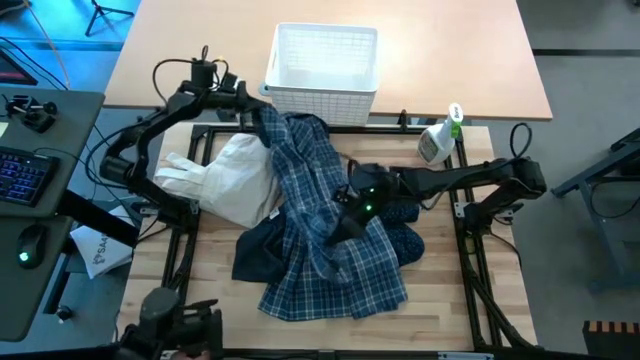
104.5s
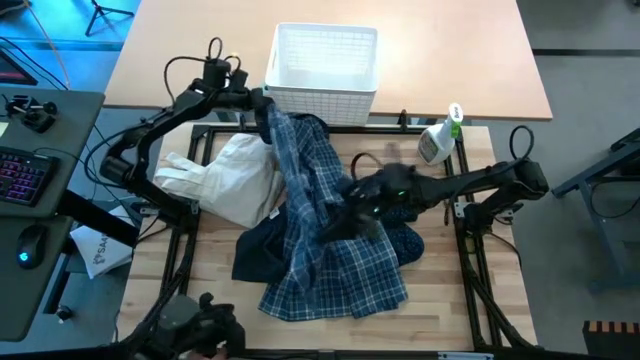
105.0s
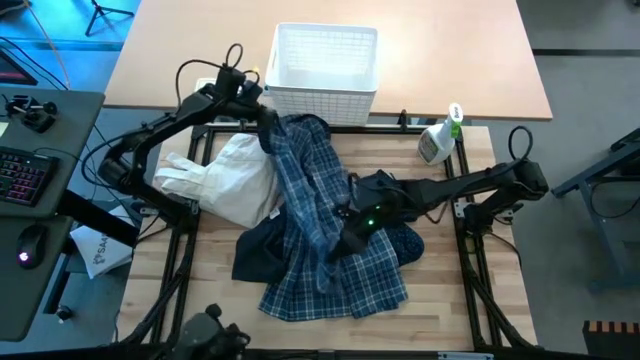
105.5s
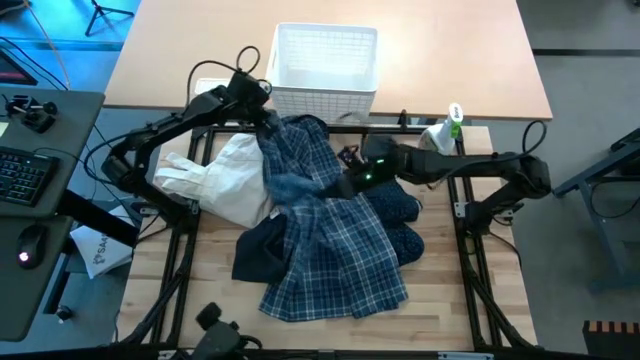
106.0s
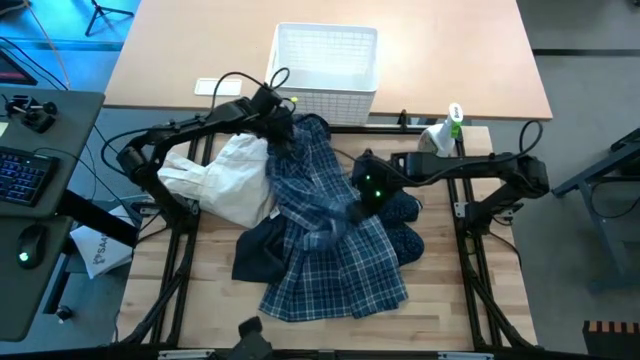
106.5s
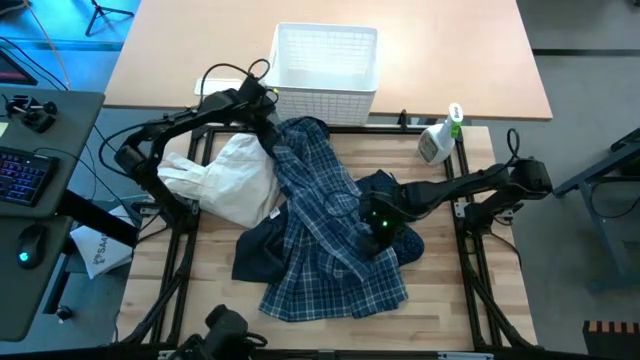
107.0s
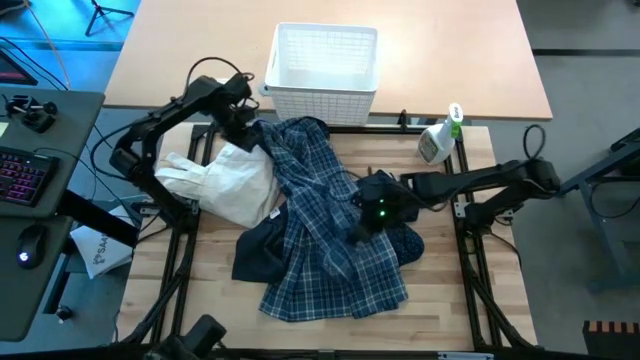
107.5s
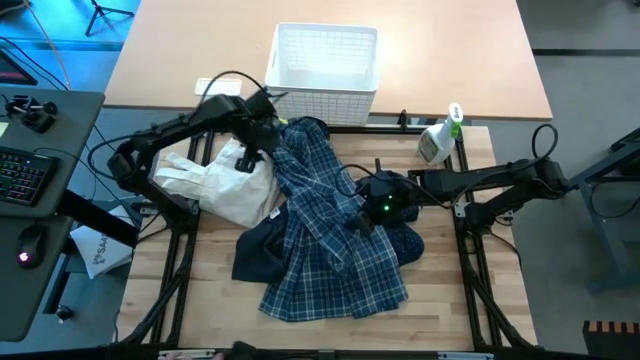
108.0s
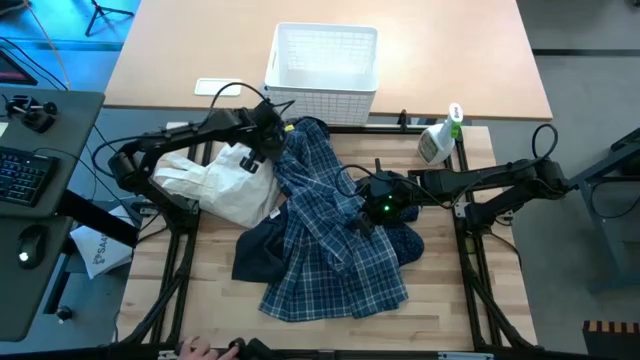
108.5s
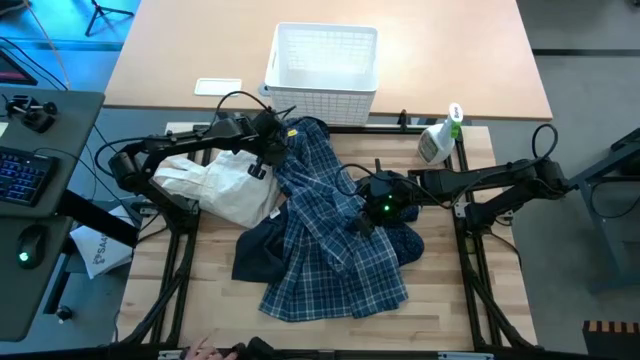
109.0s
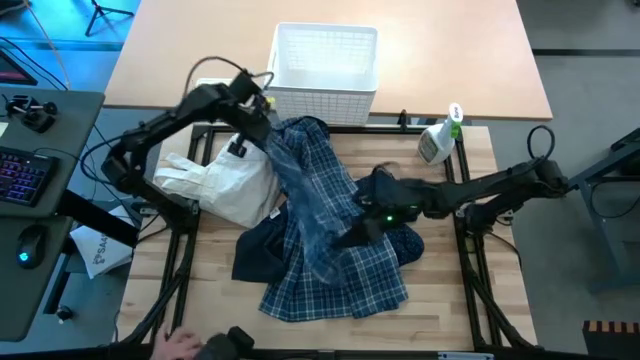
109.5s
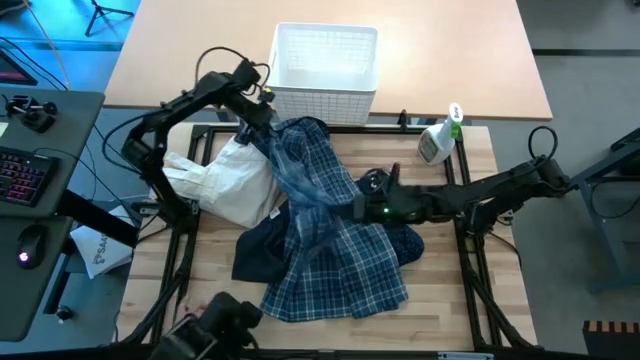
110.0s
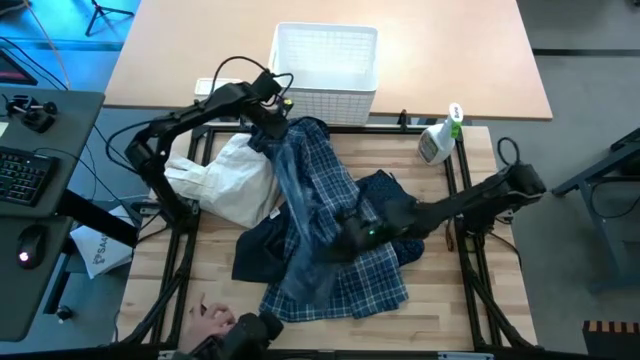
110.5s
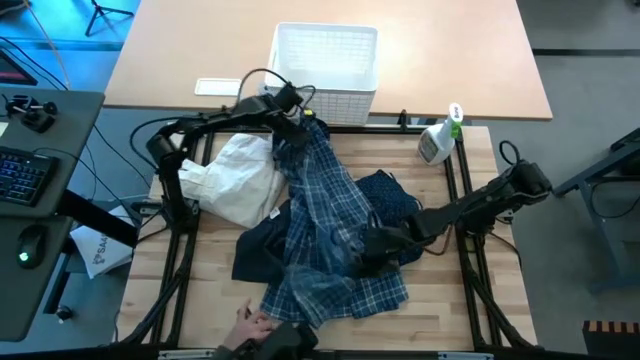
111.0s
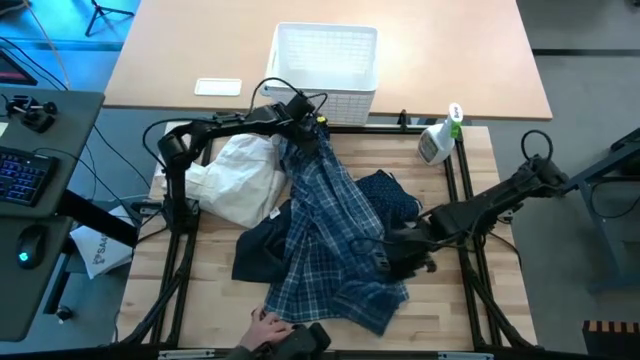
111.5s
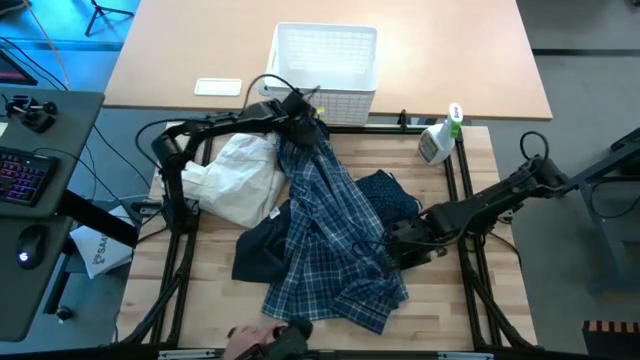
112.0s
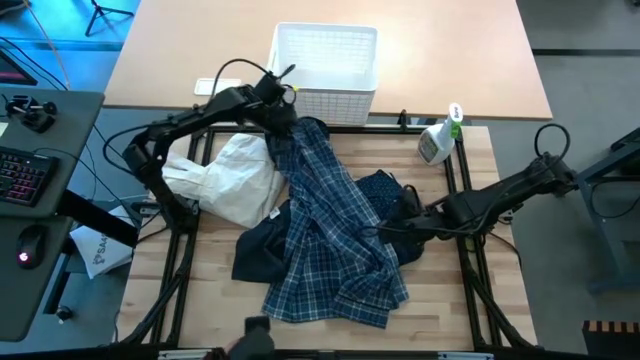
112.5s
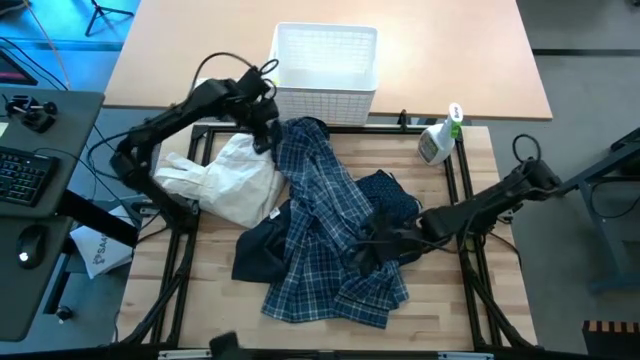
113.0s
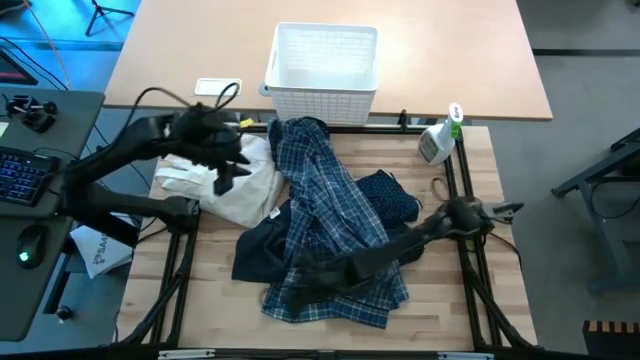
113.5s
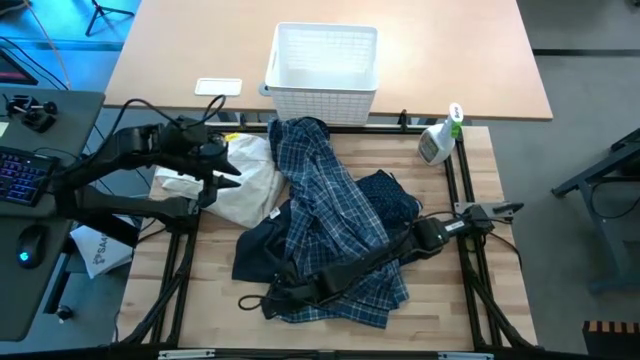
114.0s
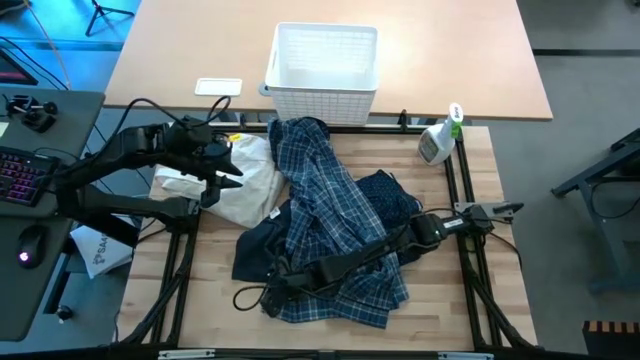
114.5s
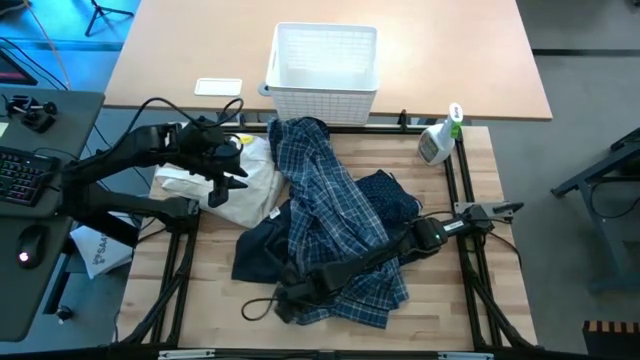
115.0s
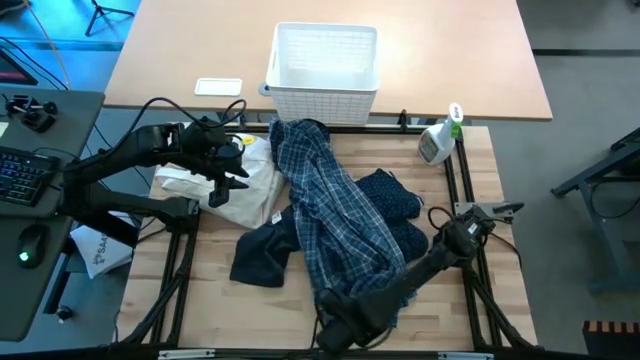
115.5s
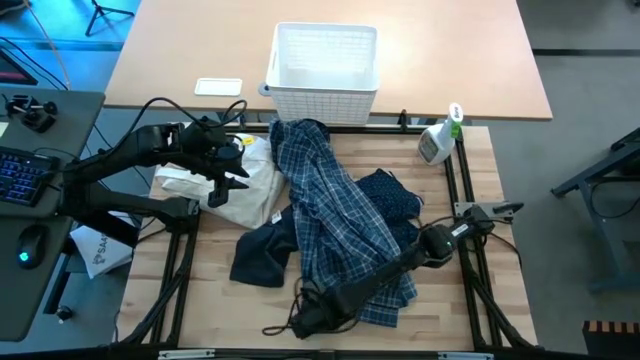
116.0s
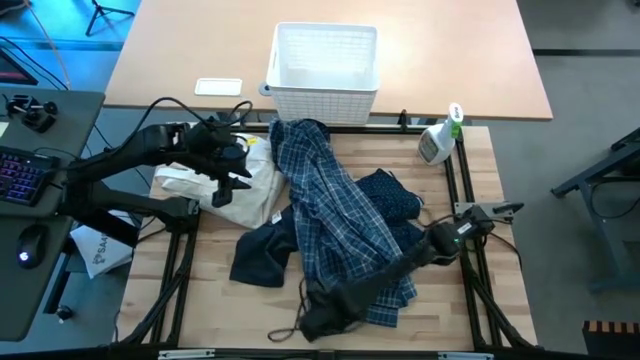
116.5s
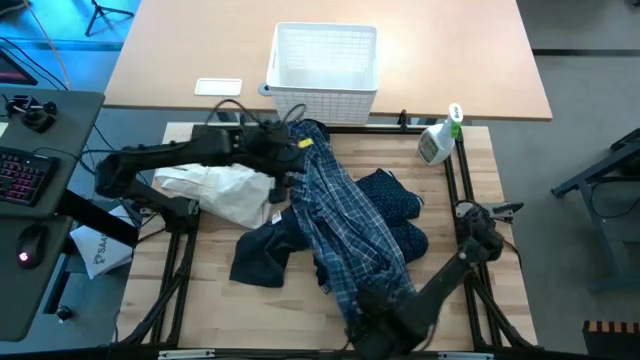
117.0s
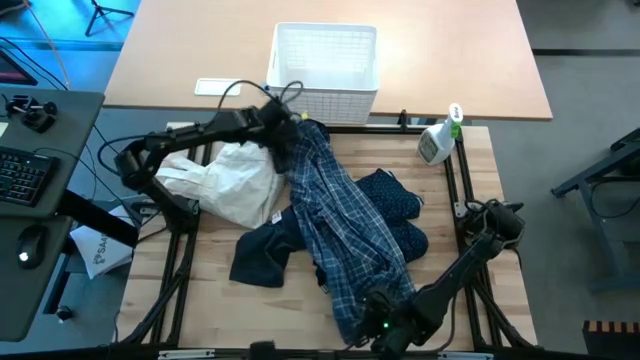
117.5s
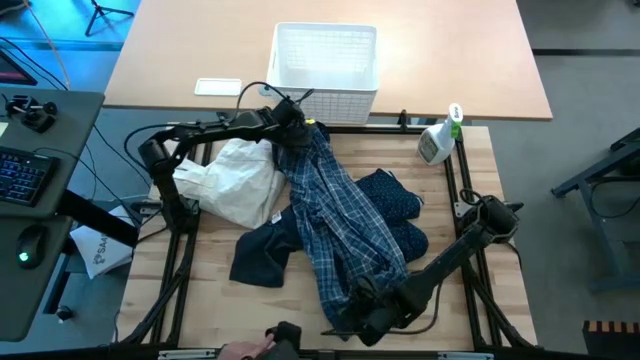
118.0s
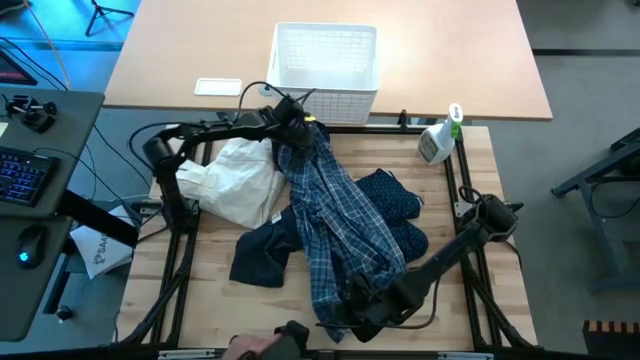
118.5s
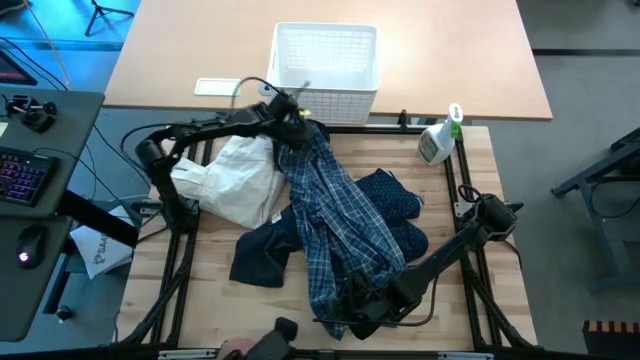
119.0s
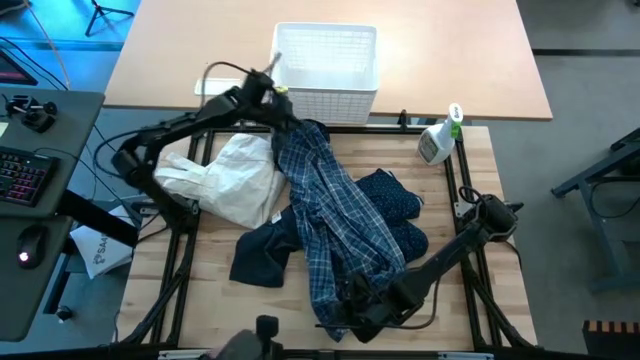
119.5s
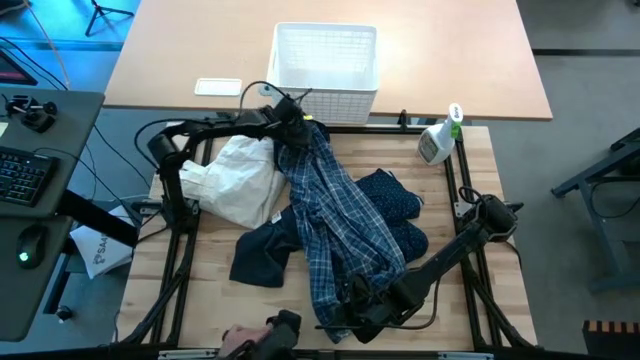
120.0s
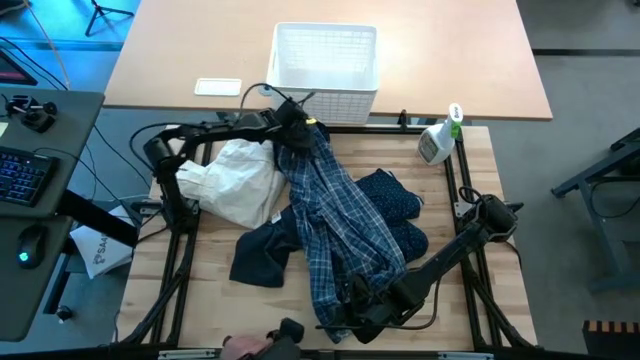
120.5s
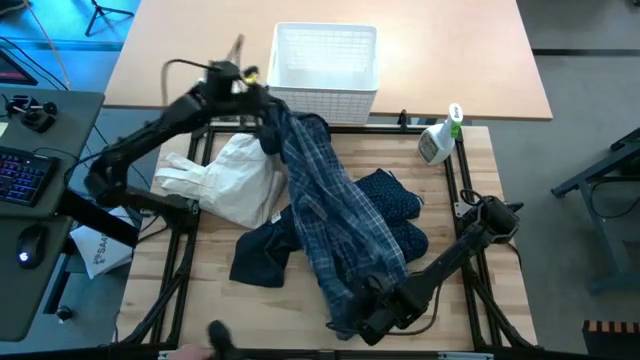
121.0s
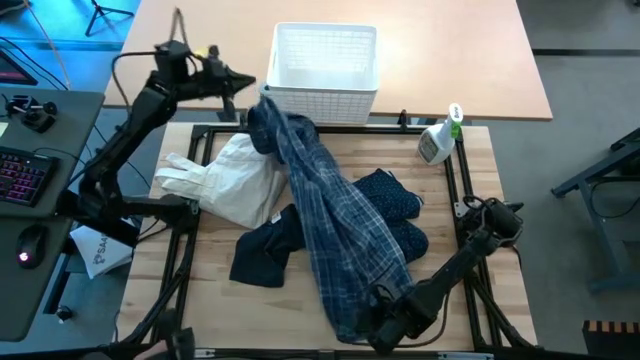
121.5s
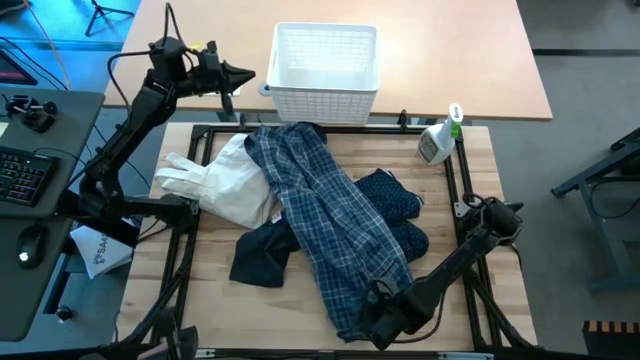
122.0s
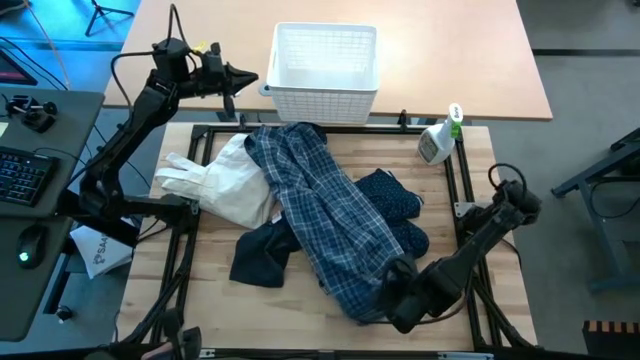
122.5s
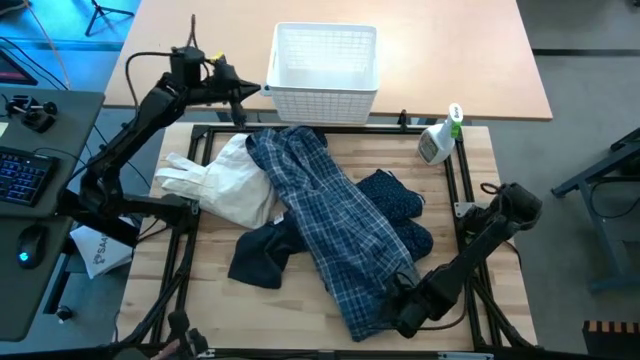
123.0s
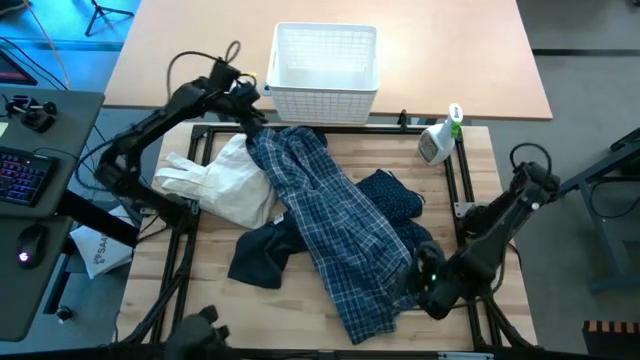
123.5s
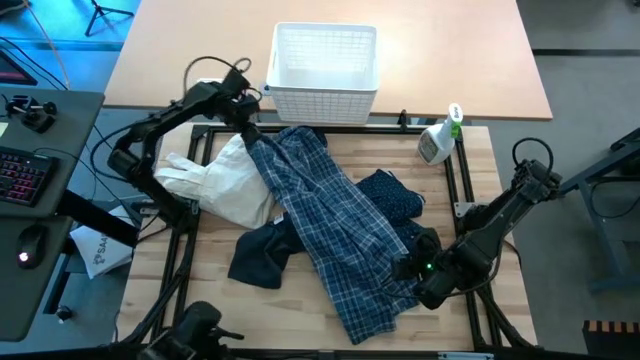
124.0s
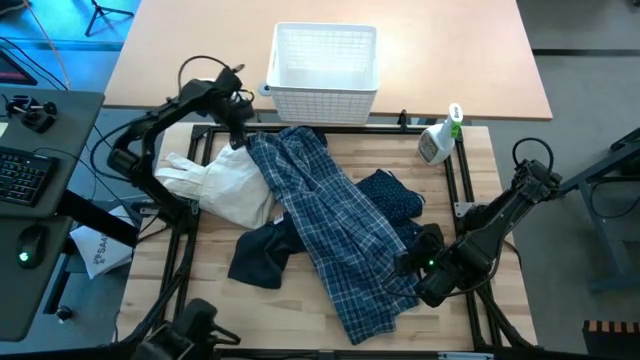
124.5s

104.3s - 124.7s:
Task: Fold laundry
Fold the blue plaid flannel shirt
